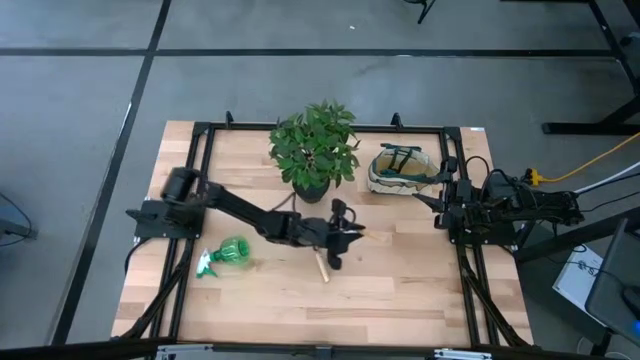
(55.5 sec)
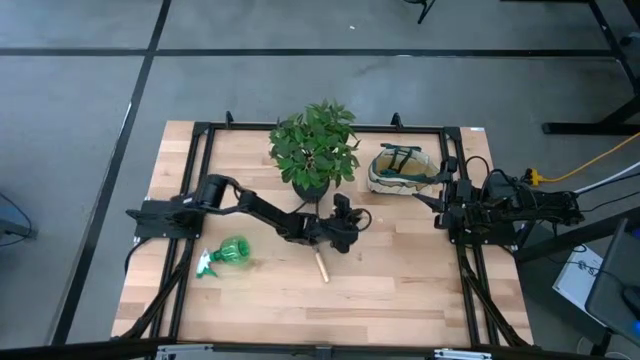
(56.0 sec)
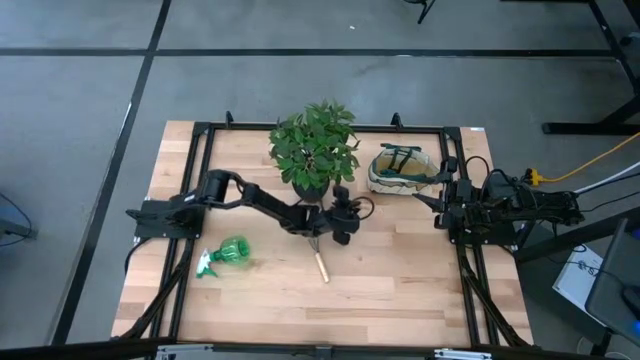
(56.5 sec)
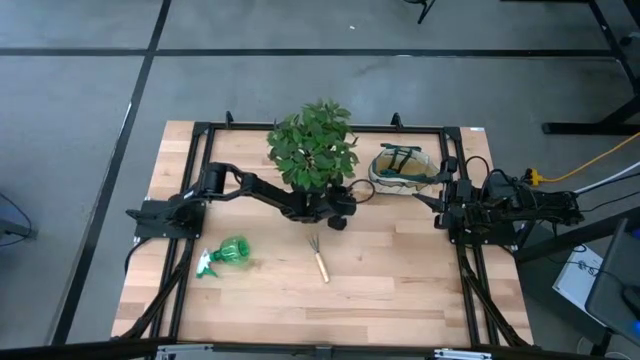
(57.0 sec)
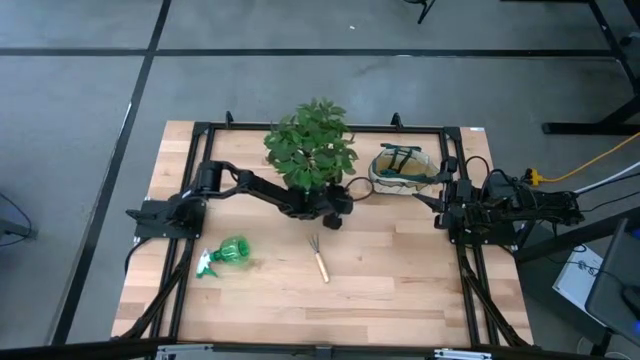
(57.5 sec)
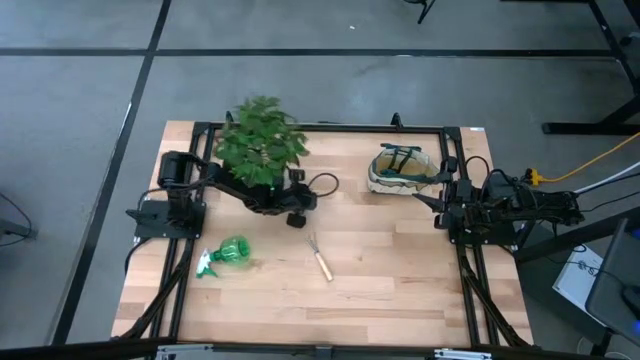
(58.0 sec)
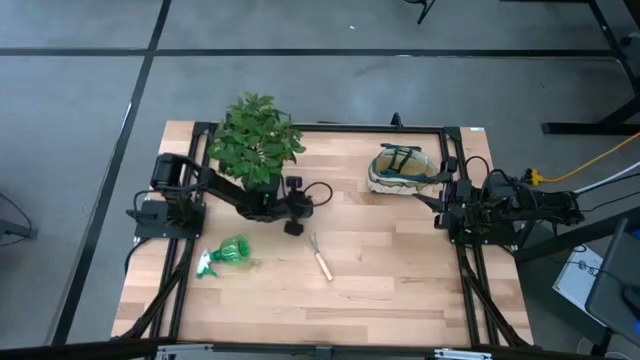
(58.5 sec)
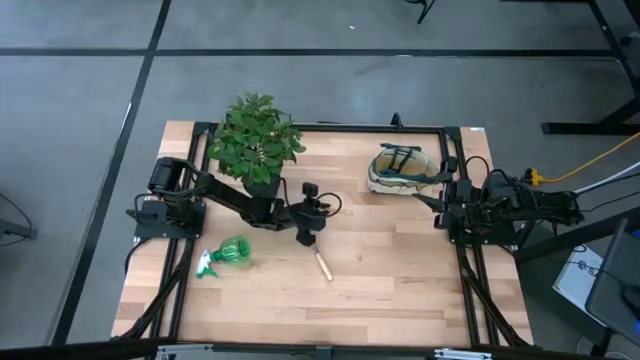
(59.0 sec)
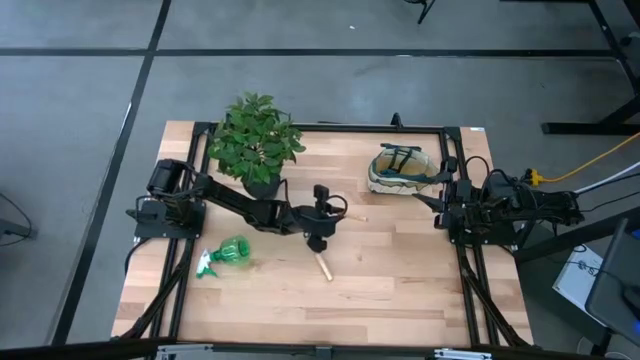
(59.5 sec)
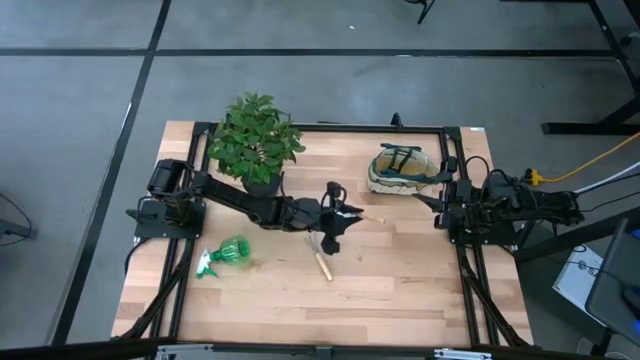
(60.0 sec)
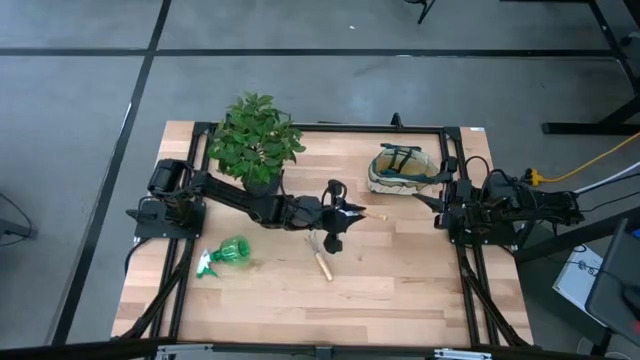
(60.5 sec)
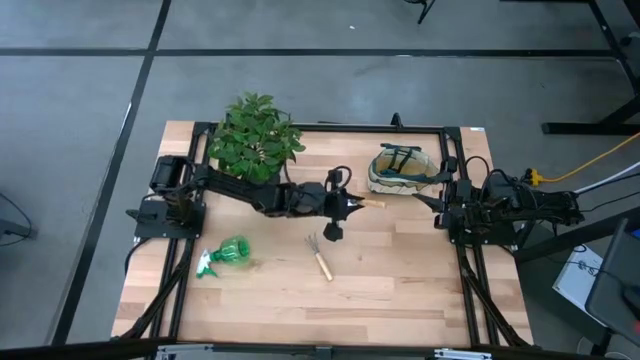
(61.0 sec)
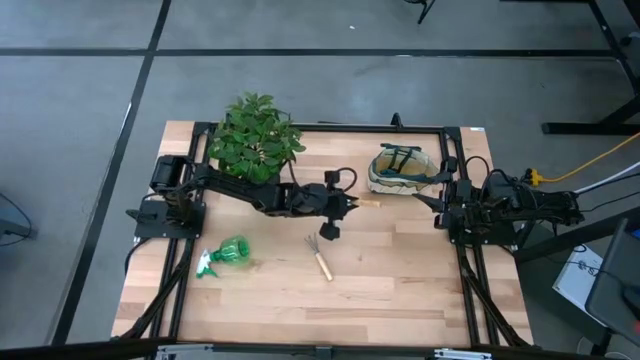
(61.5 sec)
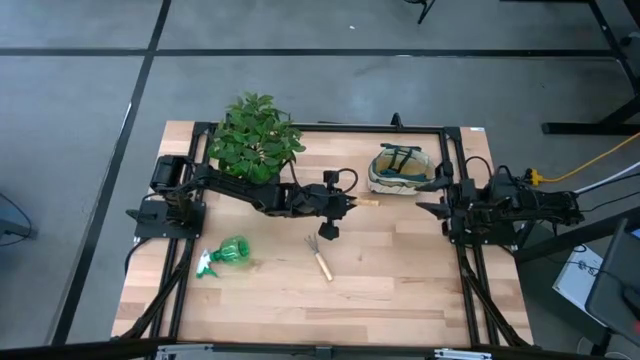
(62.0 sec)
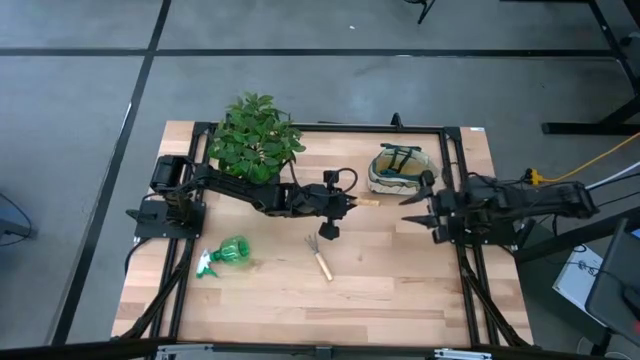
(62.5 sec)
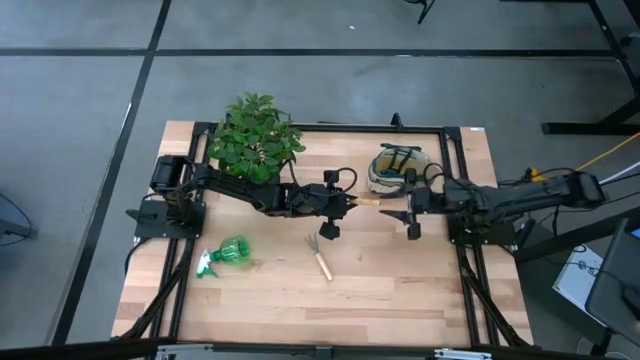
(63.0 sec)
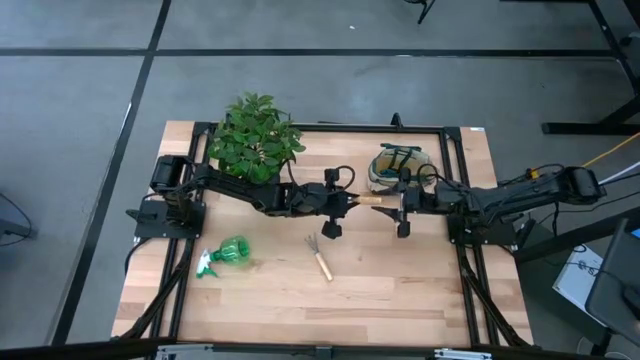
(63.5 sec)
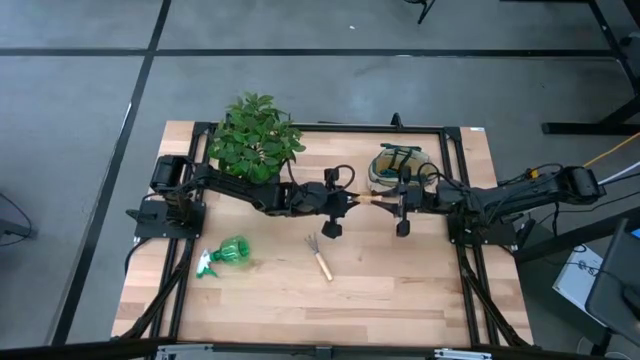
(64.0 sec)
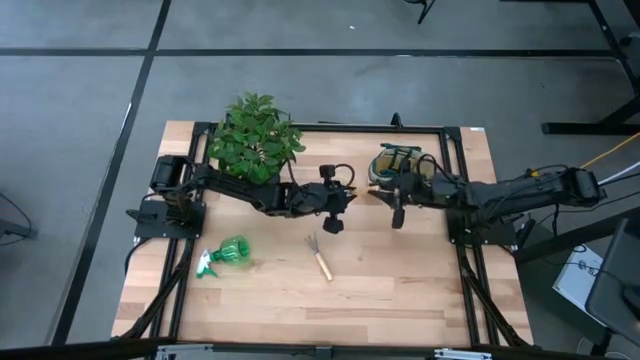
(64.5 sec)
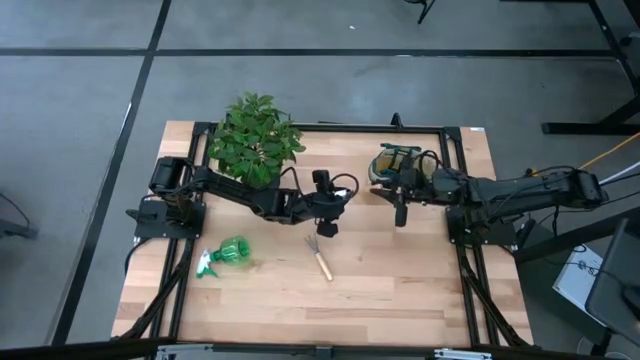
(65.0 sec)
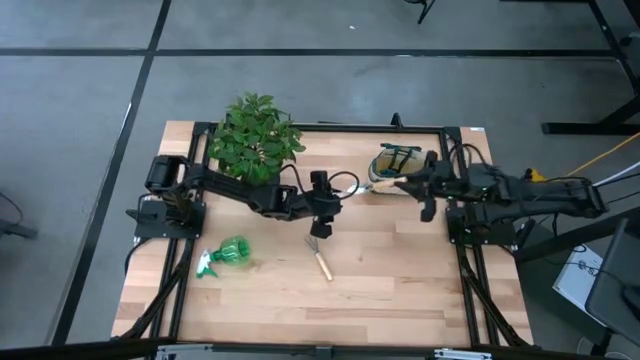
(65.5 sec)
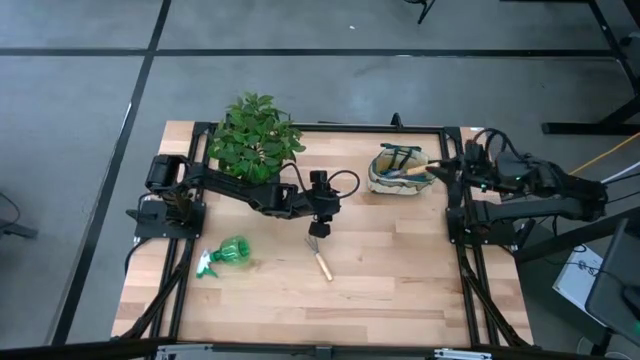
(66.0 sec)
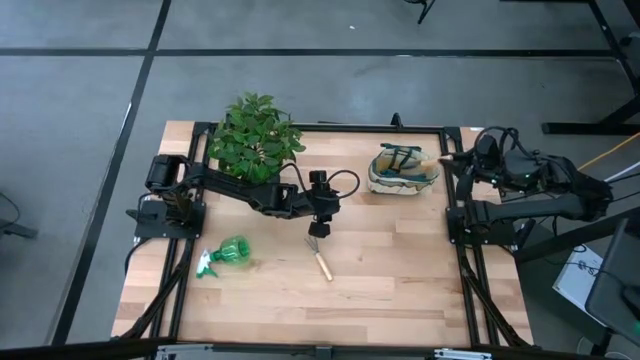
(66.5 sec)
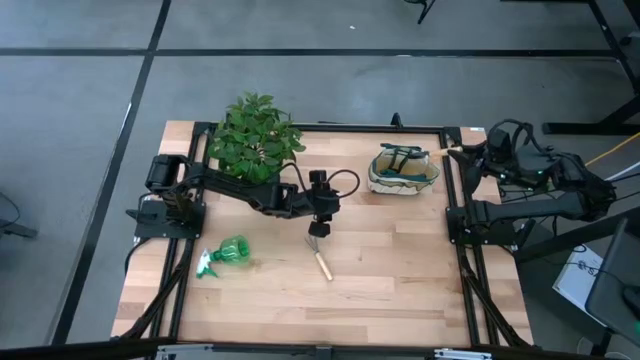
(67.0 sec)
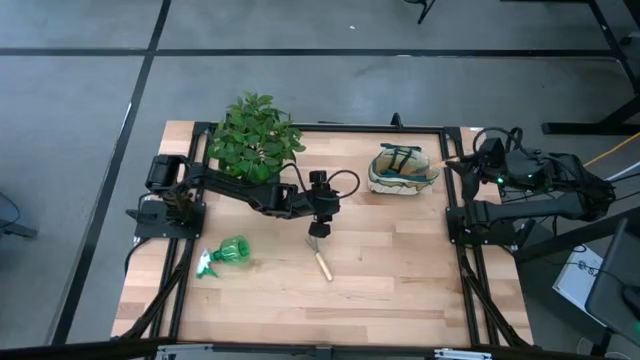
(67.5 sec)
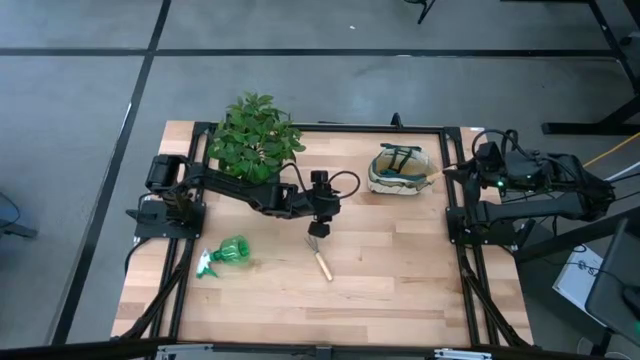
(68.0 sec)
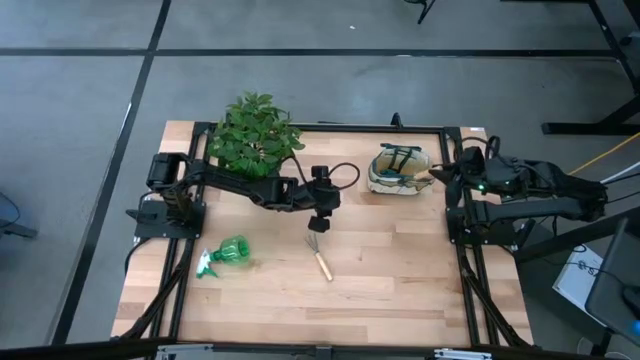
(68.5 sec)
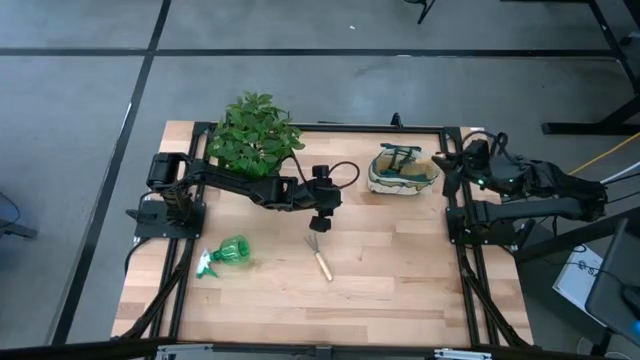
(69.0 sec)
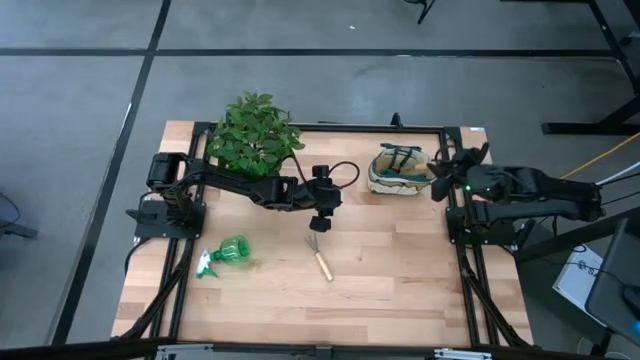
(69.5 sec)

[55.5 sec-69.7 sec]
Task: Pick & Place Garden tools in Gardening bag
Put the brown trowel into the white gardening bag

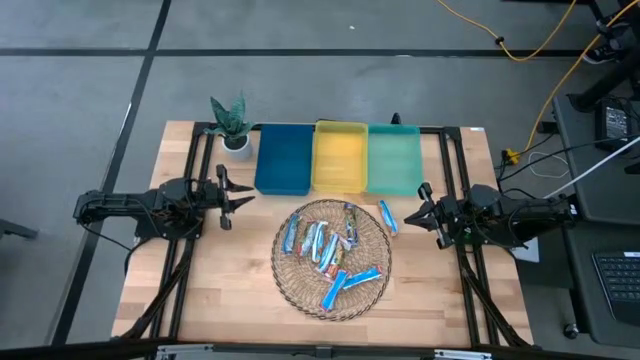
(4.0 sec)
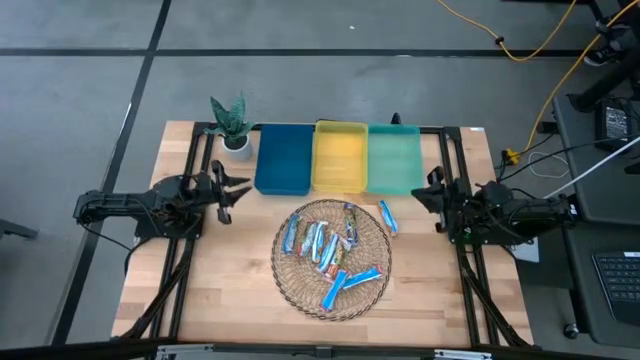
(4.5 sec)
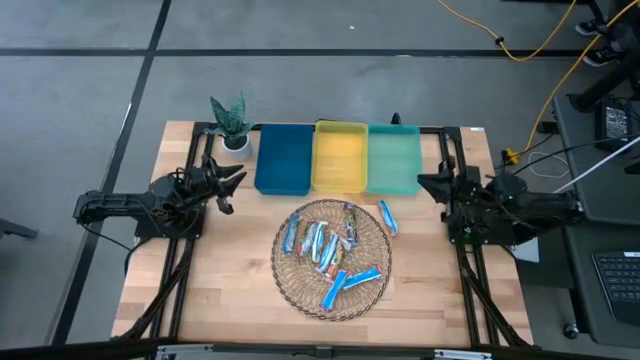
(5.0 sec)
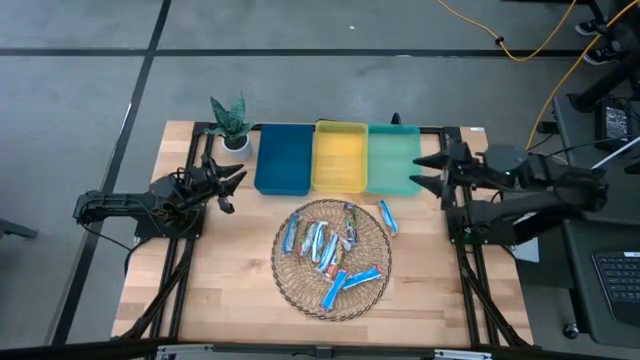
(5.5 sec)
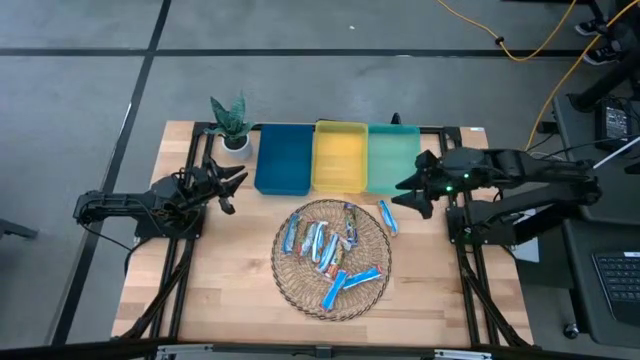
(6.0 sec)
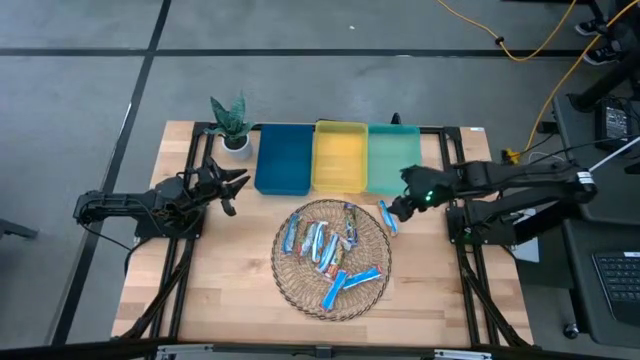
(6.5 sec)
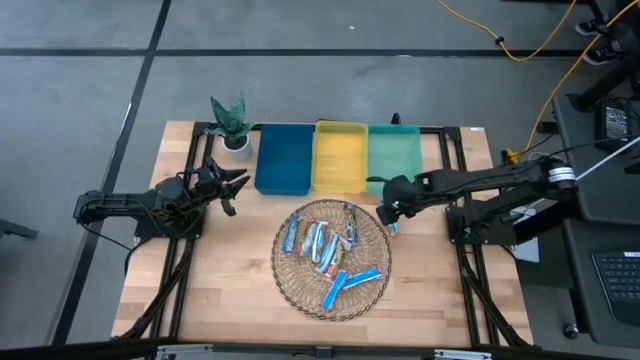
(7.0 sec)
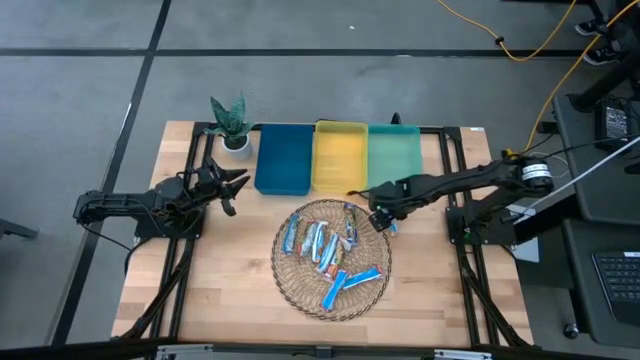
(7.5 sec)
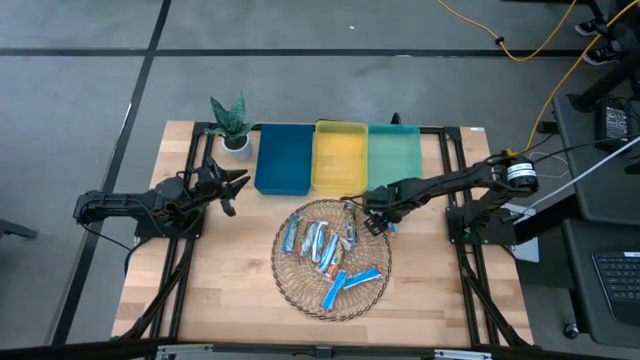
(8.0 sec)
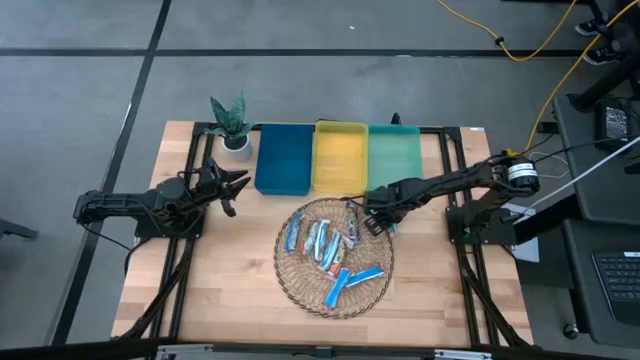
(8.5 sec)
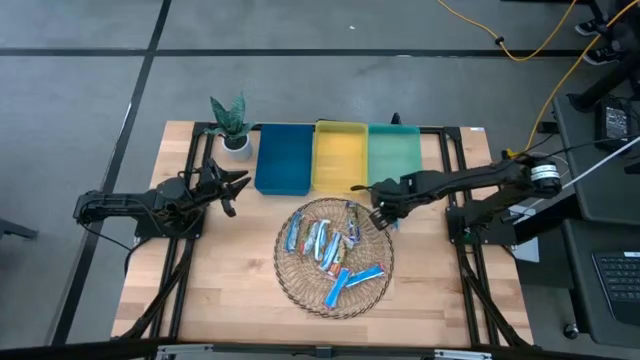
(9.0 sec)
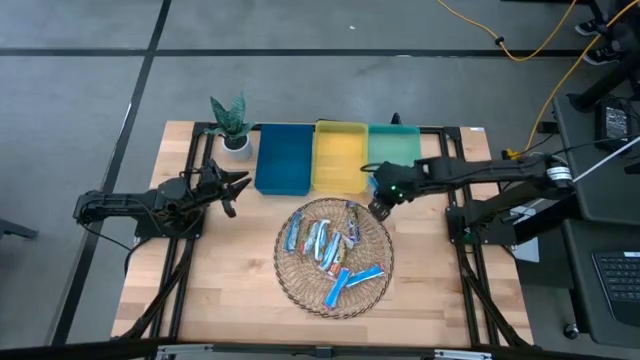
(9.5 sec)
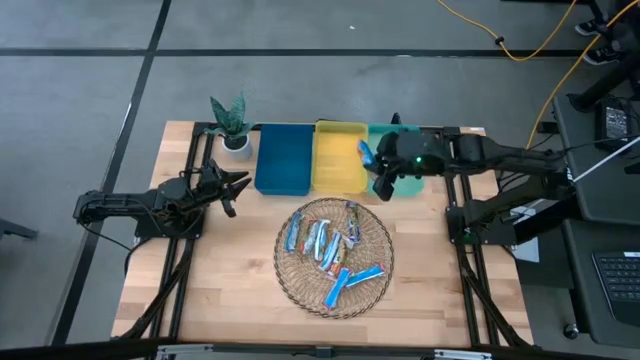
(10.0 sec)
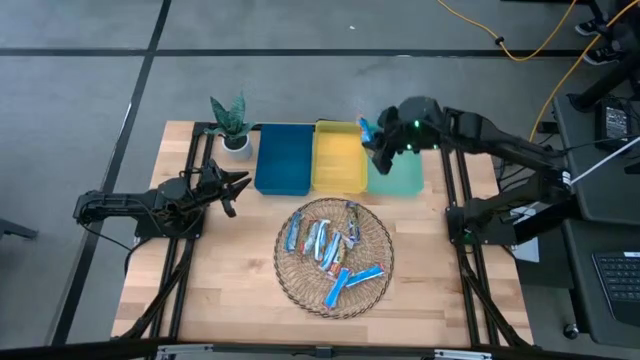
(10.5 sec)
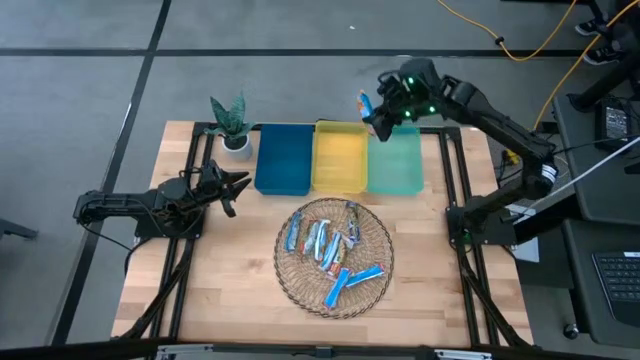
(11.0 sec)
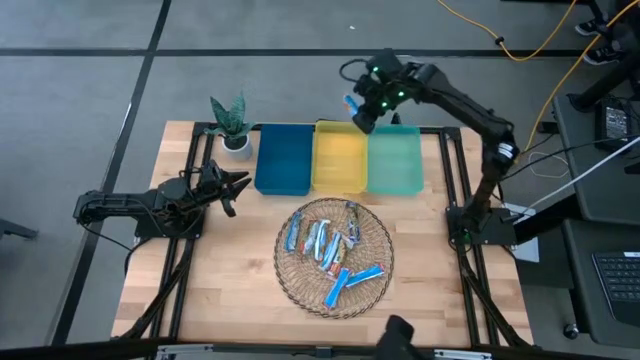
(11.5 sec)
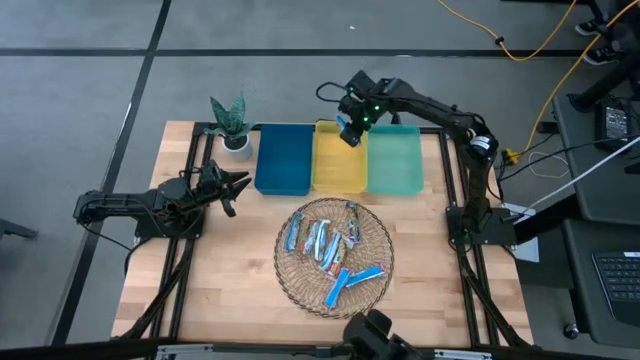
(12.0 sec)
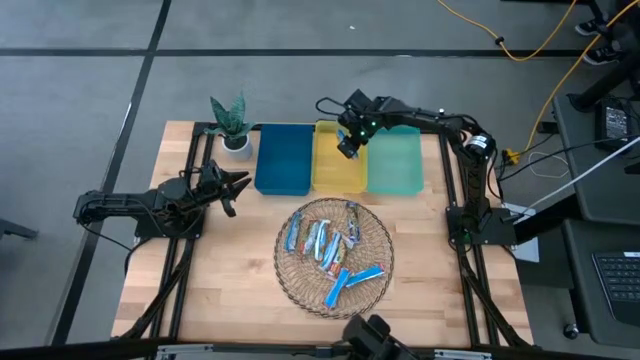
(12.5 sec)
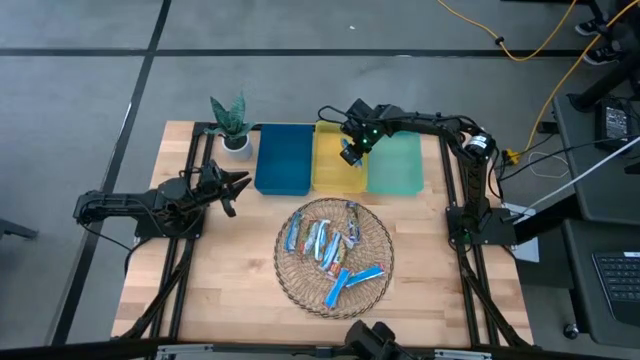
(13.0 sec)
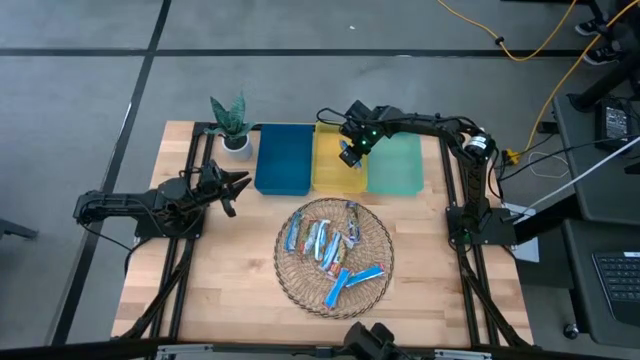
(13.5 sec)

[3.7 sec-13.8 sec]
Task: Pick and place Granola Bars by type
Put the yellow granola bar into the yellow bin
